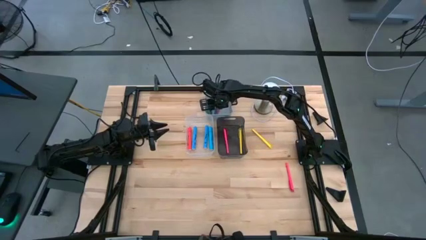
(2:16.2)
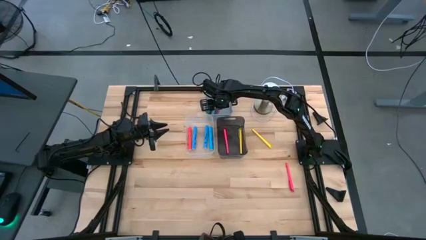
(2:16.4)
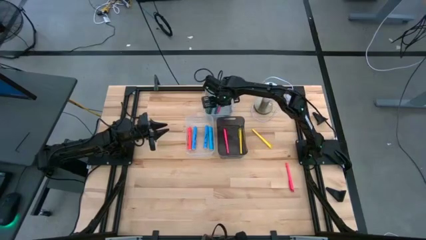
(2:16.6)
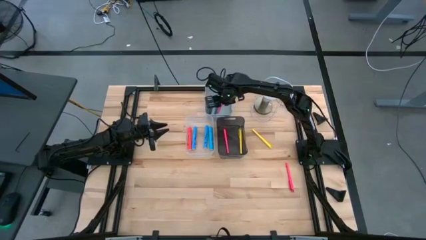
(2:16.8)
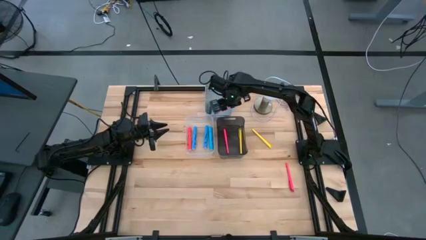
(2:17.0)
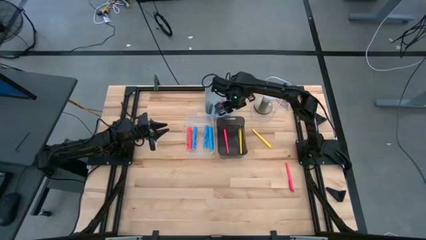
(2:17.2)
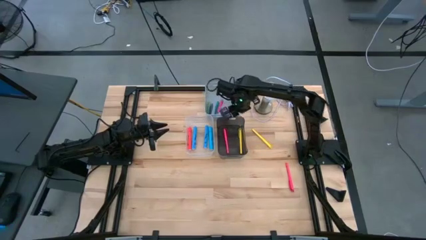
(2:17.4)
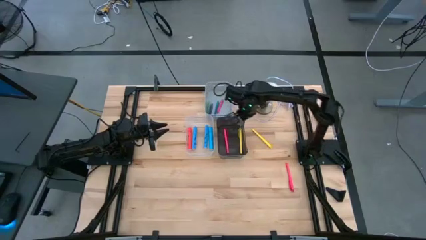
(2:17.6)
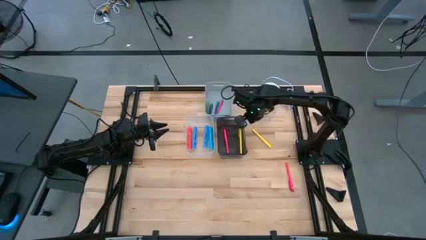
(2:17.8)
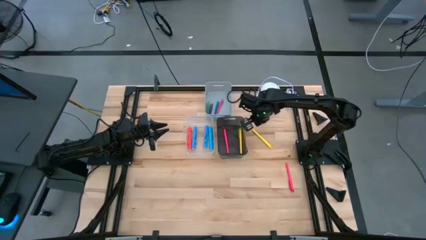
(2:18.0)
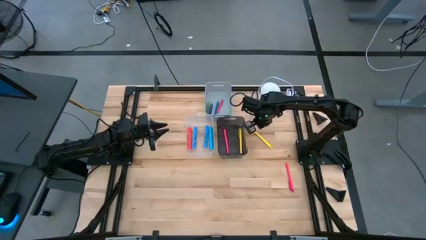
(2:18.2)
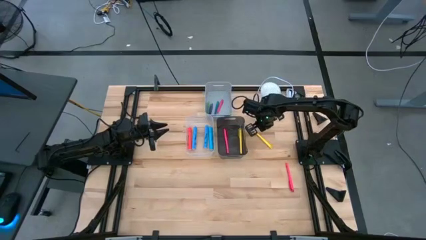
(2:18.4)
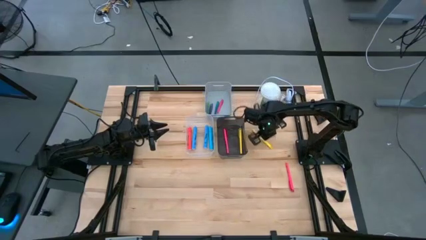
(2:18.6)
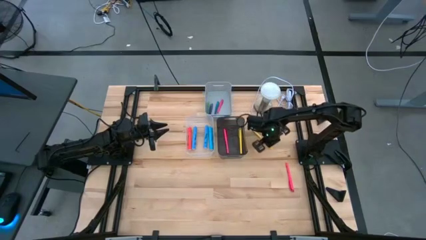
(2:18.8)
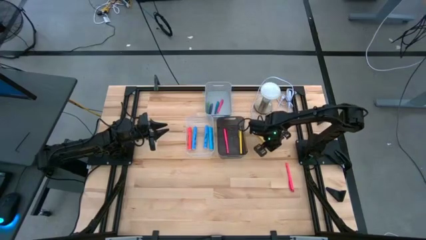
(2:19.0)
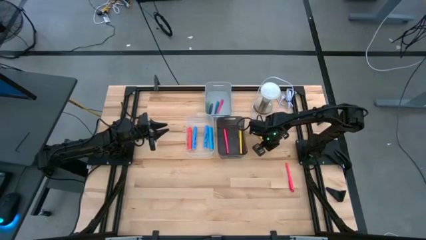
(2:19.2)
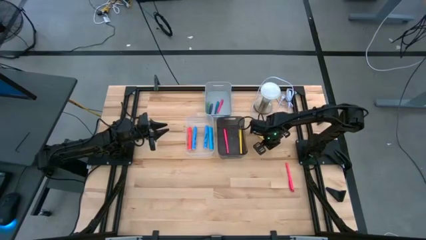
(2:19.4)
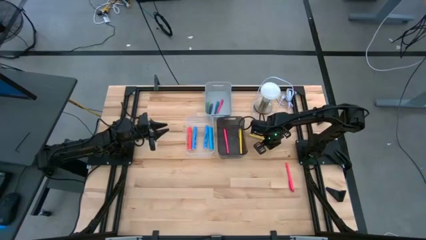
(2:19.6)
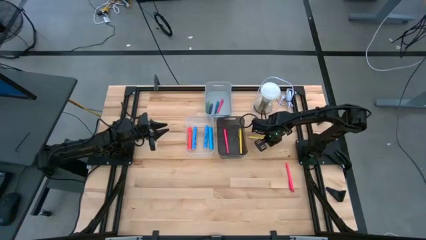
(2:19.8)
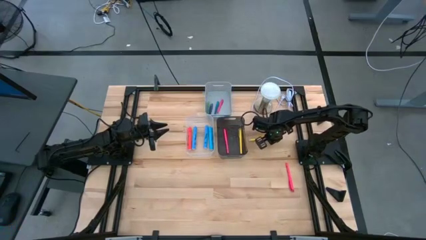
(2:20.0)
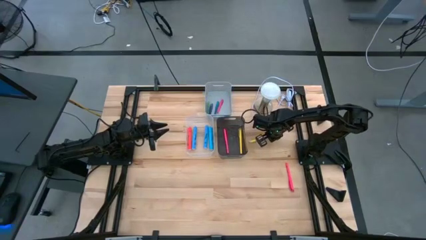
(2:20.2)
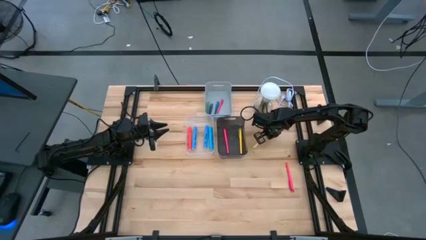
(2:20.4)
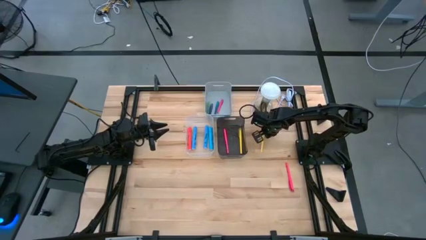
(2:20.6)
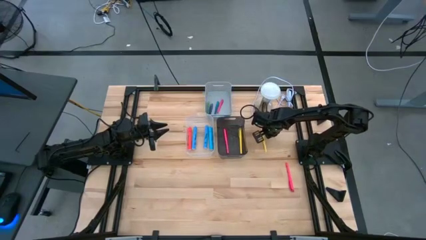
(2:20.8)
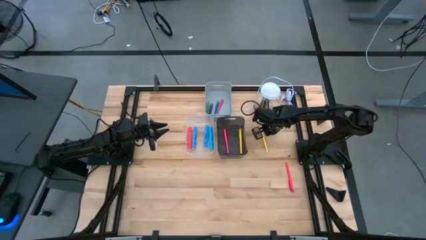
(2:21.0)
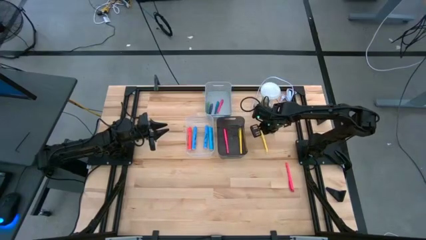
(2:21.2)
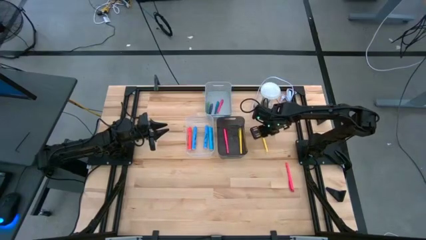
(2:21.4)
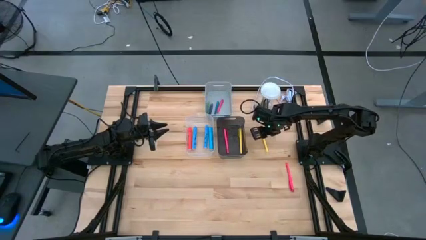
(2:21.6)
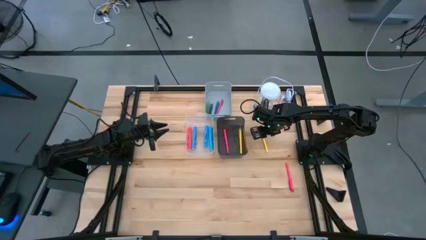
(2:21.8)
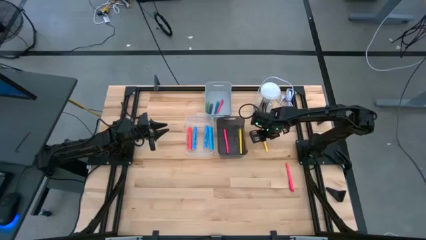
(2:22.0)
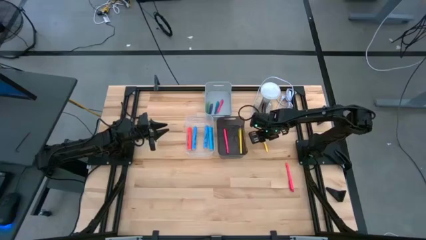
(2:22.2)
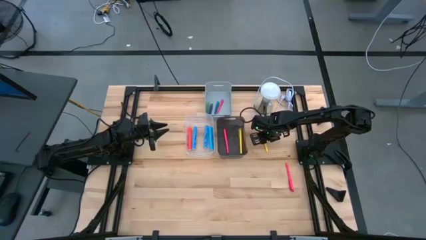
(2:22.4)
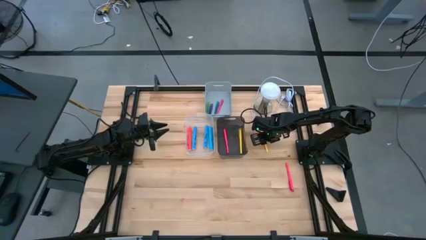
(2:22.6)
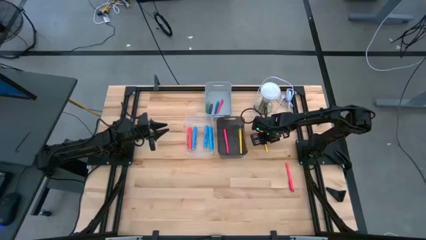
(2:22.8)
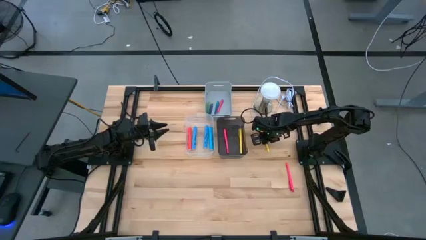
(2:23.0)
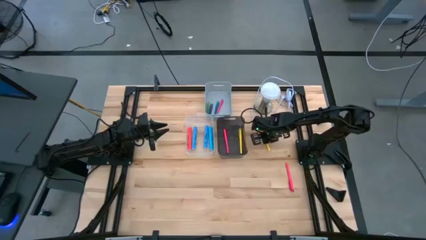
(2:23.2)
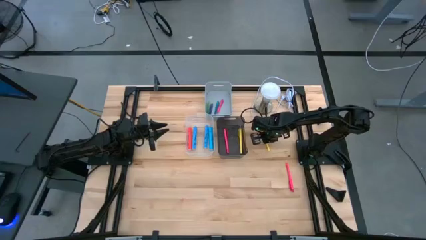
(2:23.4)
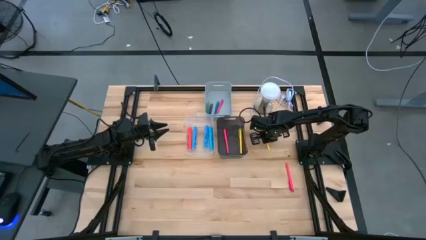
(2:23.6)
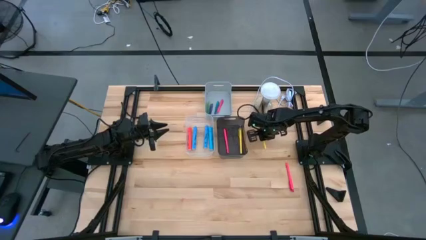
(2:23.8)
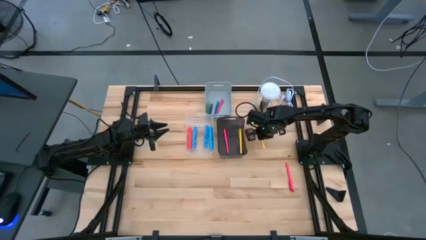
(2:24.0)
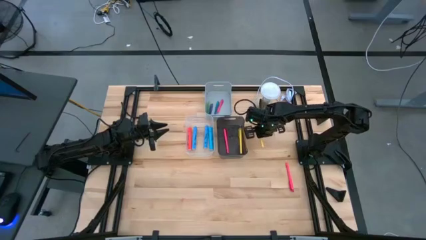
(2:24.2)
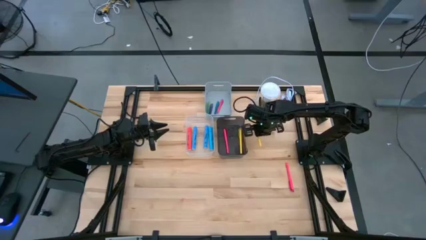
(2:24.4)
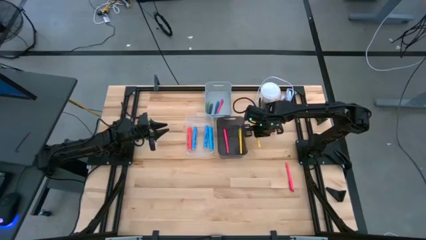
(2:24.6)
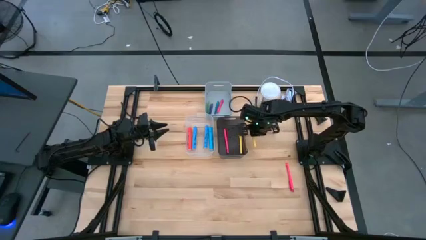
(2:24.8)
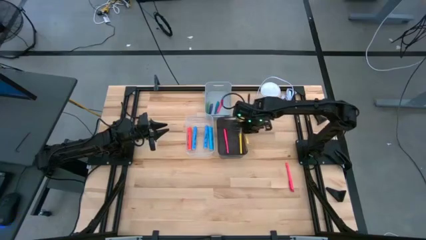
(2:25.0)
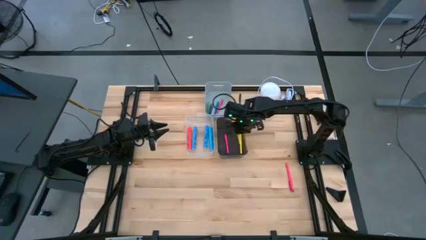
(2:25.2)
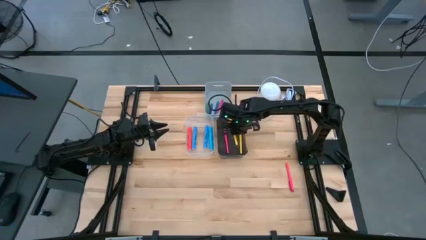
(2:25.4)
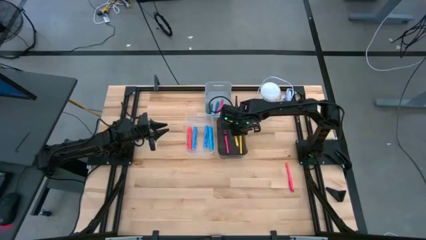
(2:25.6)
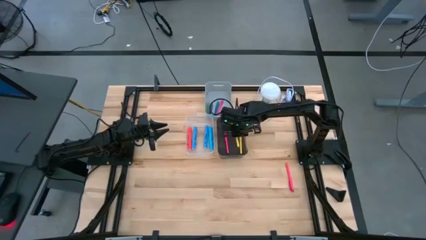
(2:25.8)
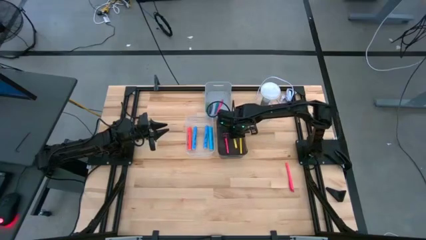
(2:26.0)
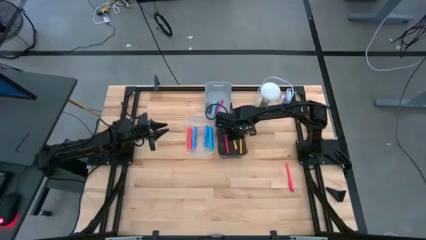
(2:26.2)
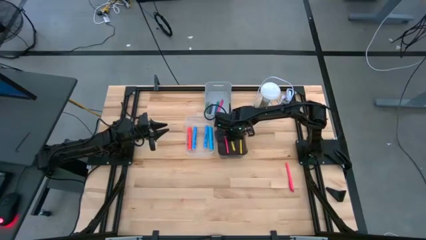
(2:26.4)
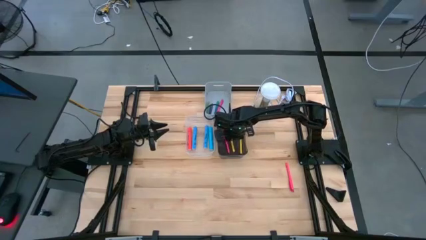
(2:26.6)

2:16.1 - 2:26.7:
Task: Pick & Place Markers
Put the yellow marker pen into the black bin

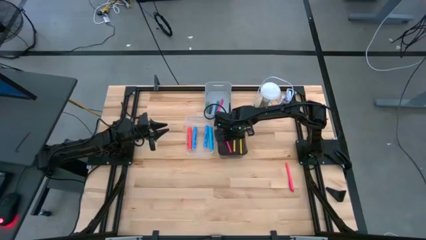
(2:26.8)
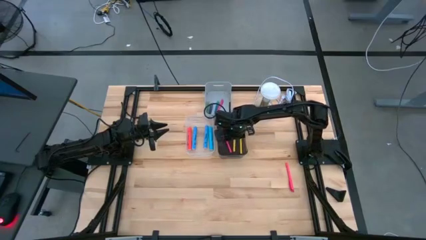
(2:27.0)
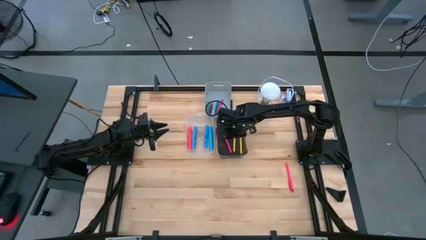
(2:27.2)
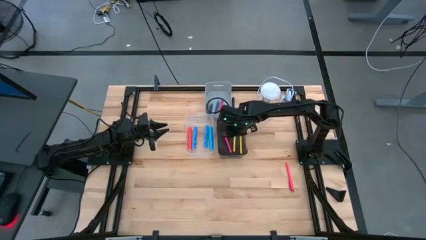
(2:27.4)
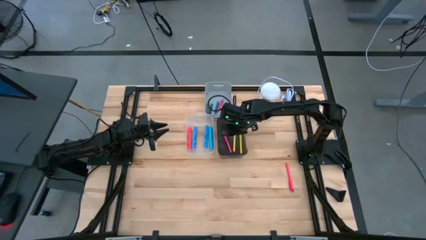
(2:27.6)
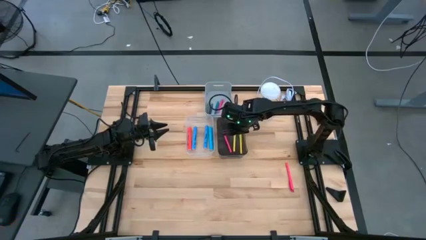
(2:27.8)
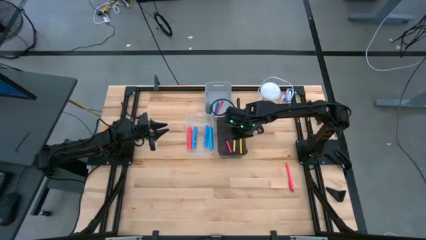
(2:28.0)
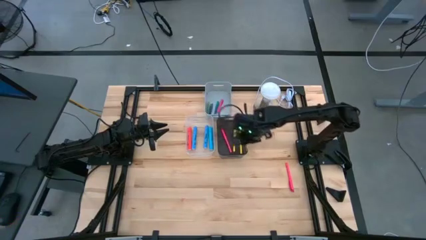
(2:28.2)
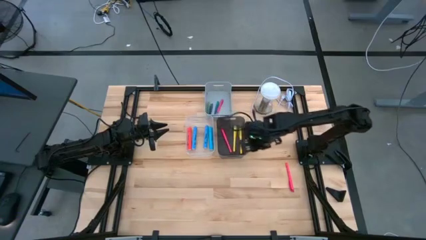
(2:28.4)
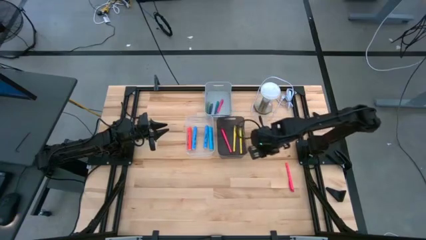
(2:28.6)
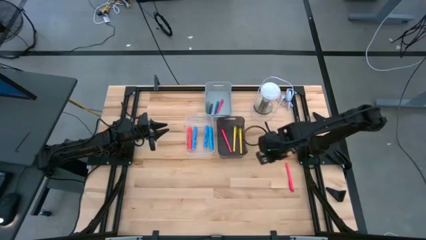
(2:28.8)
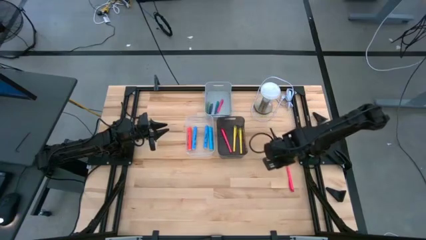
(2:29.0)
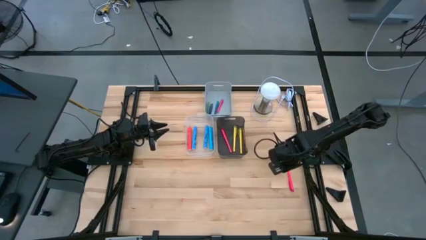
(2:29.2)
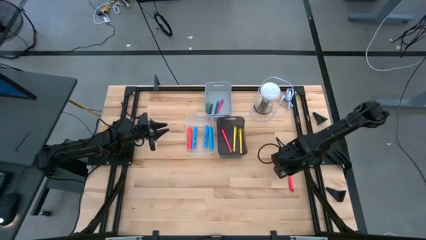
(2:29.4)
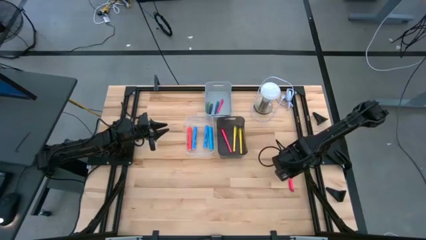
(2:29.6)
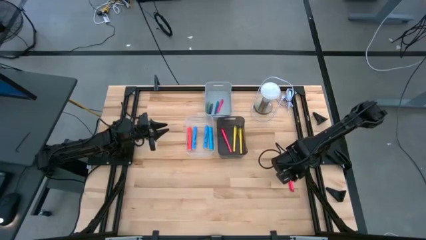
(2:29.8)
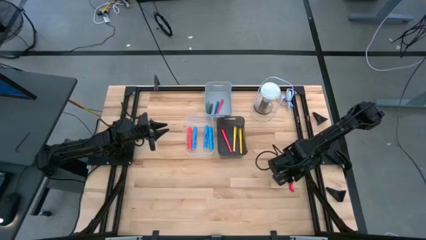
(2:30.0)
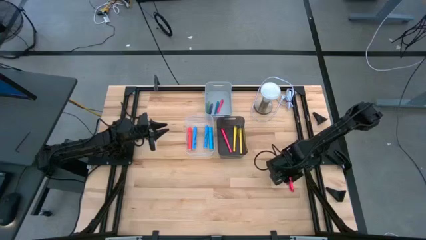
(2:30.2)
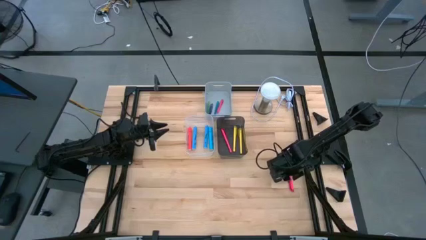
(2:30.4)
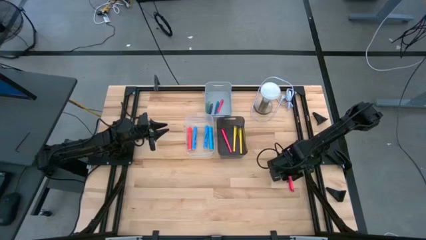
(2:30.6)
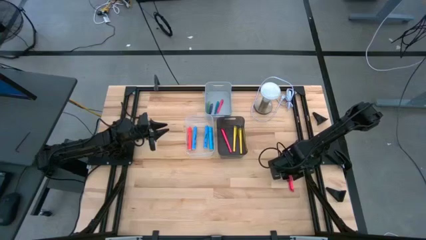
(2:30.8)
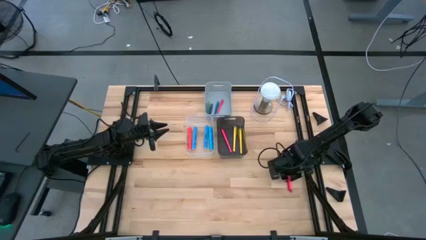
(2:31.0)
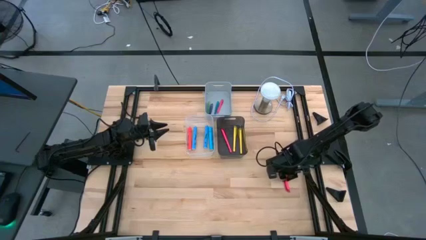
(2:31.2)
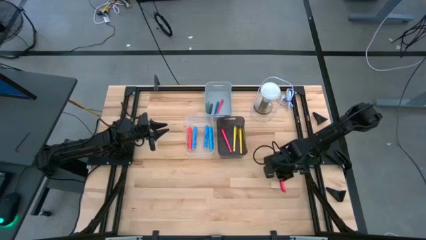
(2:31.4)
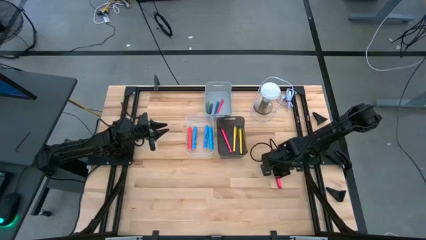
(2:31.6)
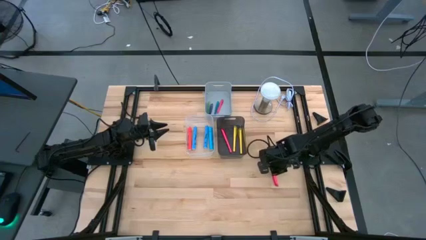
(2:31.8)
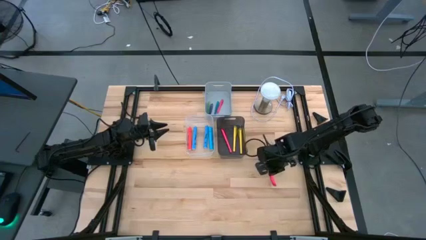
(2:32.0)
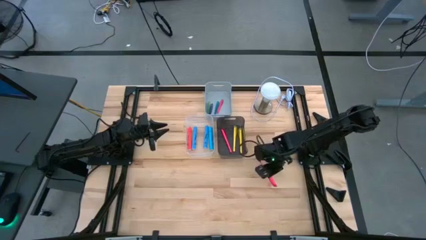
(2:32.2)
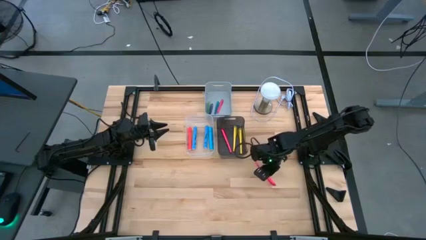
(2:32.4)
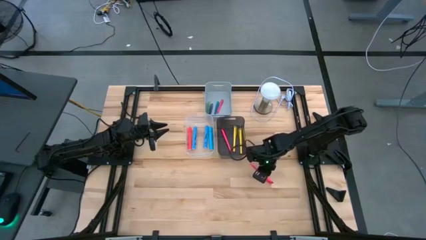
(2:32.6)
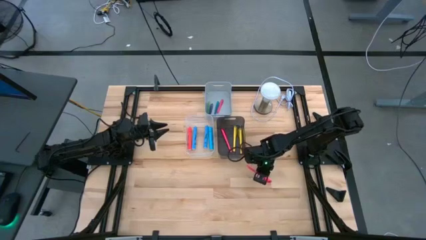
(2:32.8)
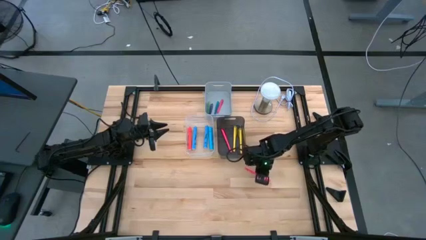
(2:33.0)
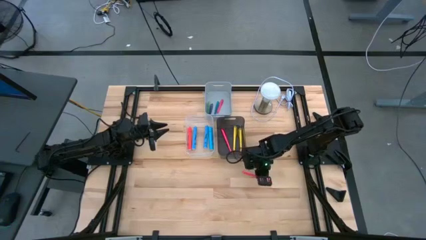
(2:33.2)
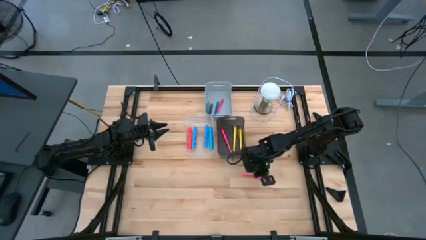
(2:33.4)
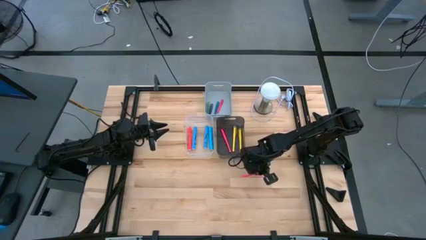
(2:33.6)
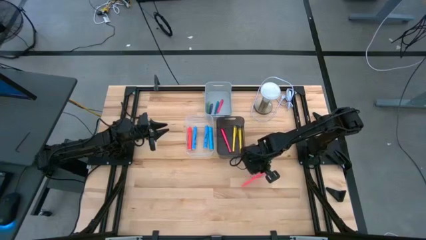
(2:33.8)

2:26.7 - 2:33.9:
Put the pink marker pen into the black bin
